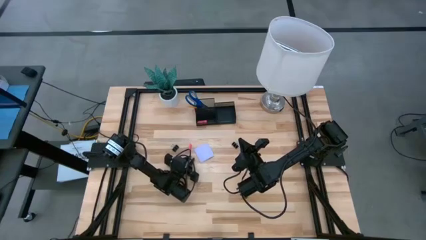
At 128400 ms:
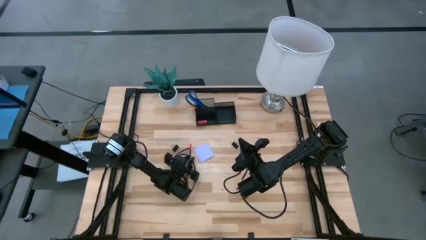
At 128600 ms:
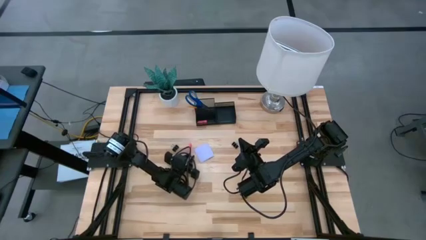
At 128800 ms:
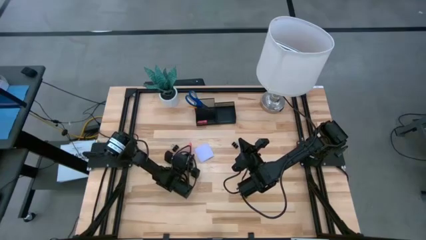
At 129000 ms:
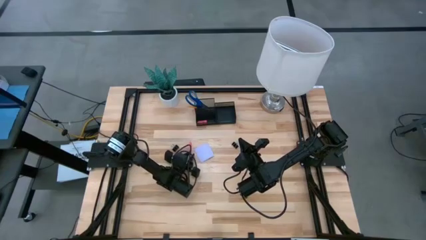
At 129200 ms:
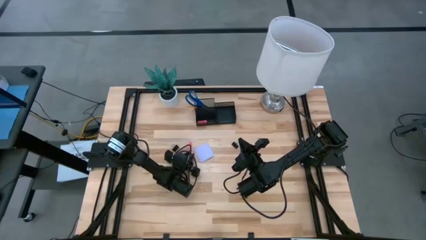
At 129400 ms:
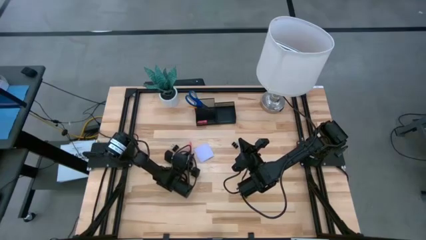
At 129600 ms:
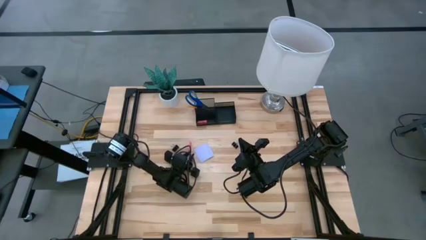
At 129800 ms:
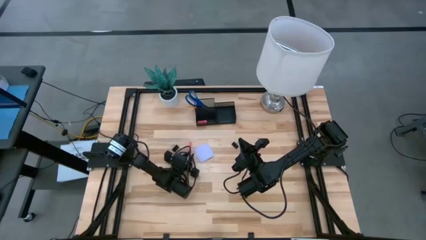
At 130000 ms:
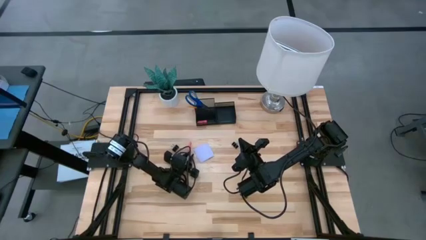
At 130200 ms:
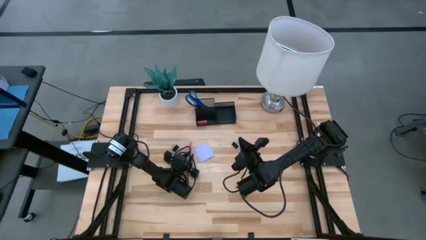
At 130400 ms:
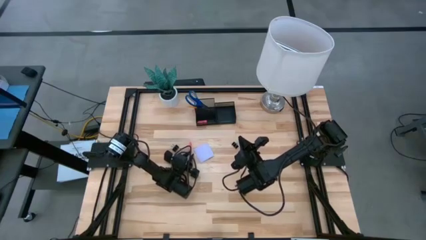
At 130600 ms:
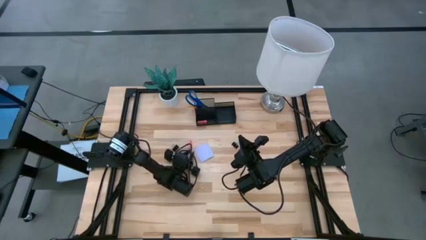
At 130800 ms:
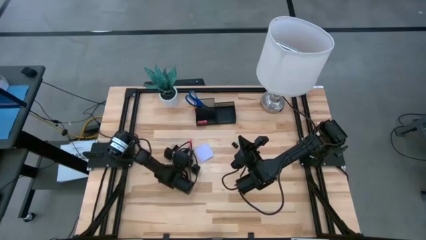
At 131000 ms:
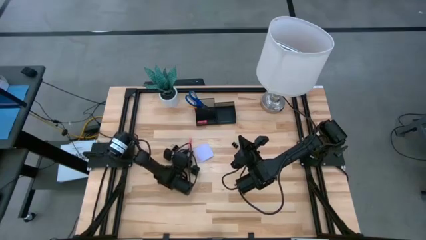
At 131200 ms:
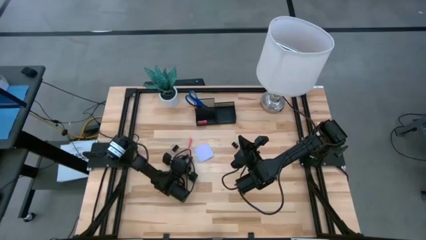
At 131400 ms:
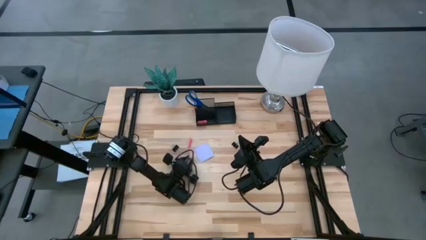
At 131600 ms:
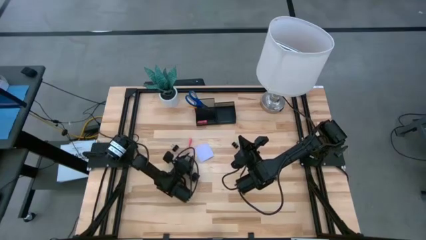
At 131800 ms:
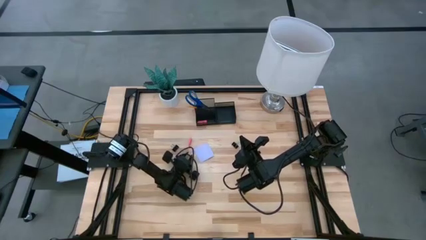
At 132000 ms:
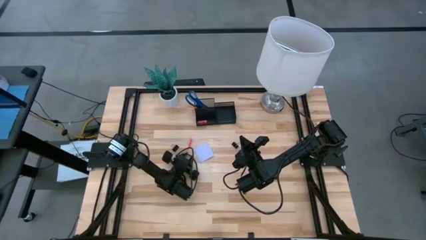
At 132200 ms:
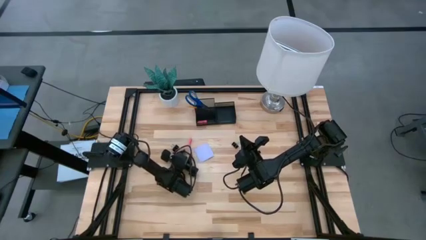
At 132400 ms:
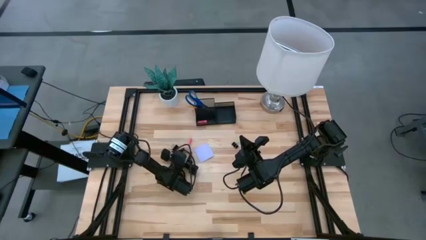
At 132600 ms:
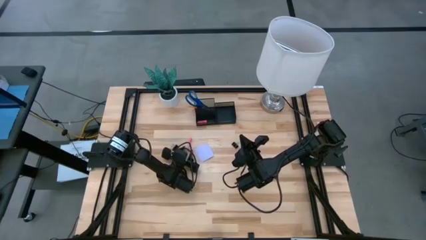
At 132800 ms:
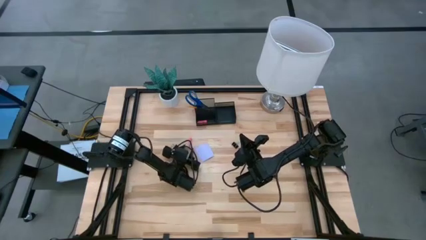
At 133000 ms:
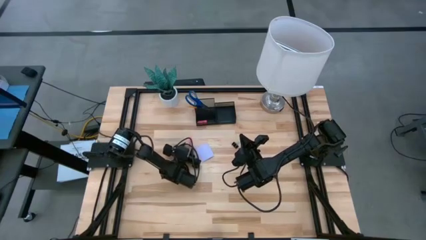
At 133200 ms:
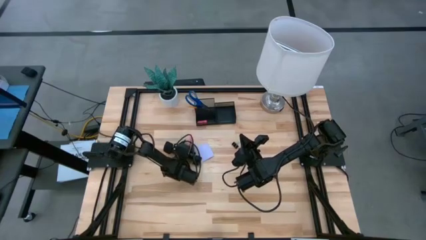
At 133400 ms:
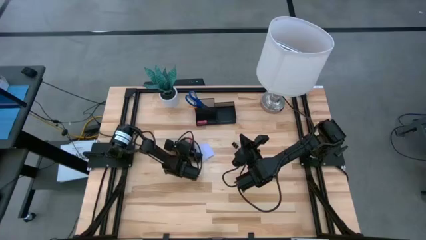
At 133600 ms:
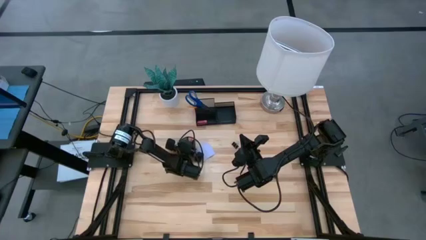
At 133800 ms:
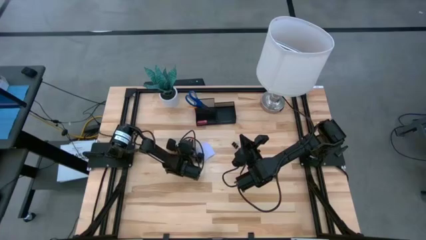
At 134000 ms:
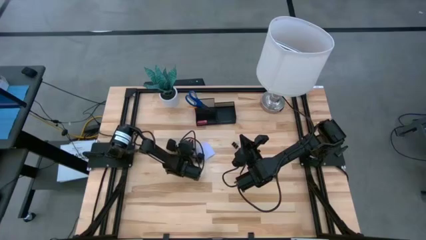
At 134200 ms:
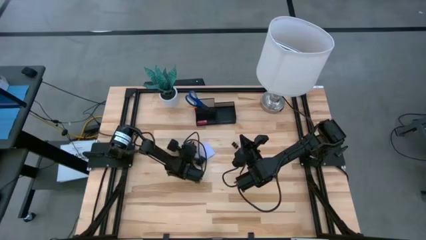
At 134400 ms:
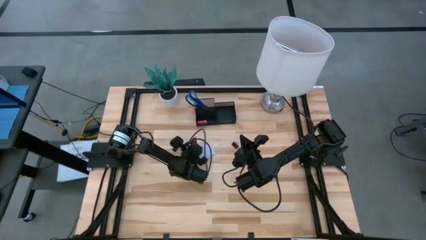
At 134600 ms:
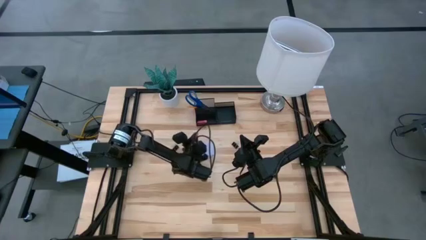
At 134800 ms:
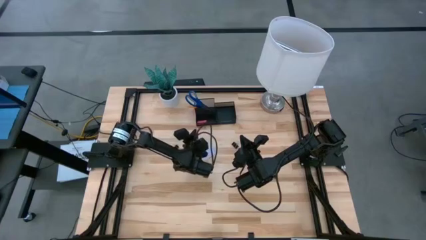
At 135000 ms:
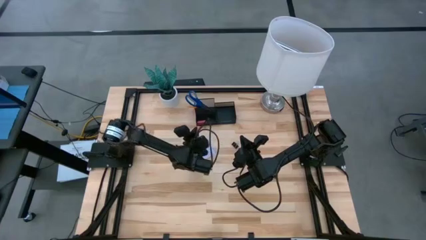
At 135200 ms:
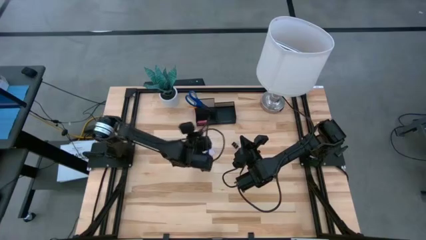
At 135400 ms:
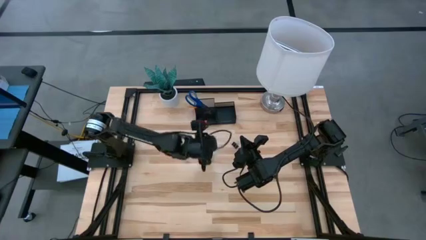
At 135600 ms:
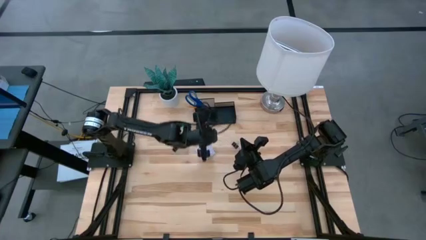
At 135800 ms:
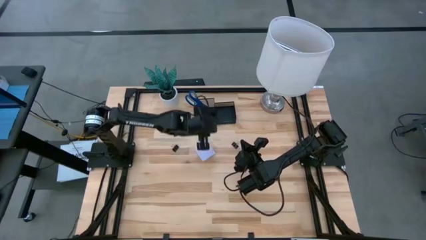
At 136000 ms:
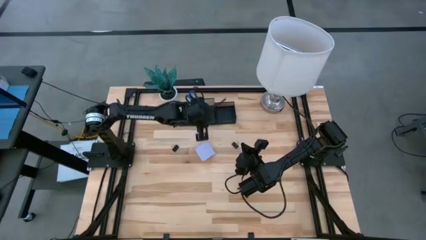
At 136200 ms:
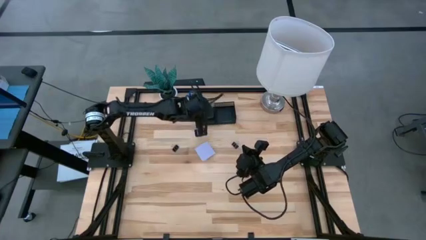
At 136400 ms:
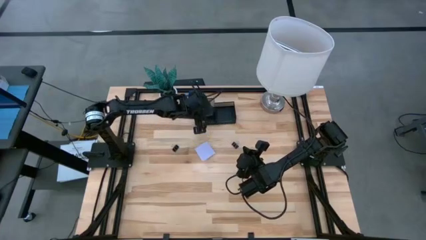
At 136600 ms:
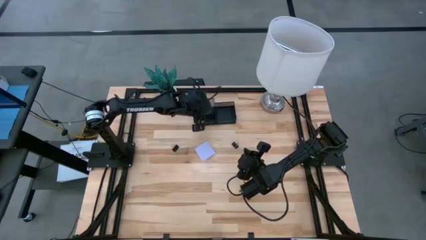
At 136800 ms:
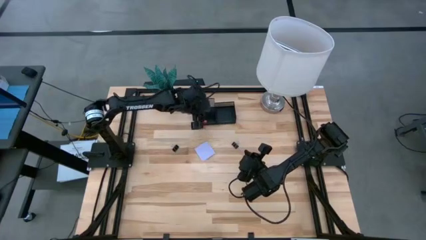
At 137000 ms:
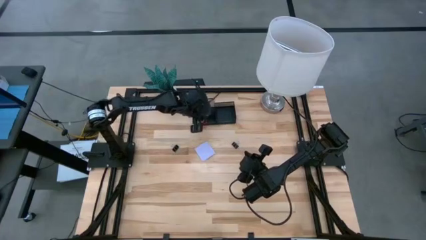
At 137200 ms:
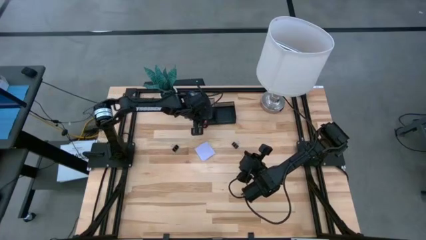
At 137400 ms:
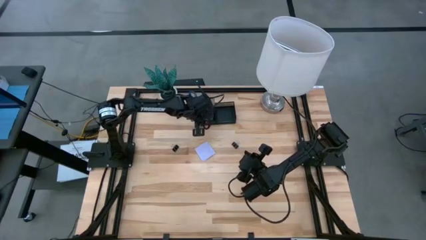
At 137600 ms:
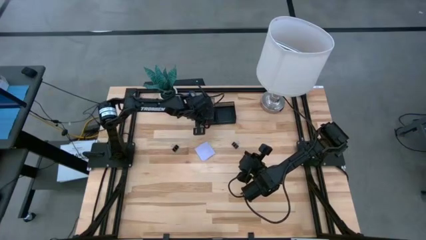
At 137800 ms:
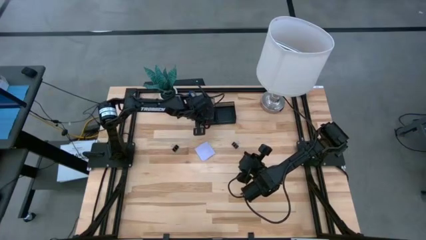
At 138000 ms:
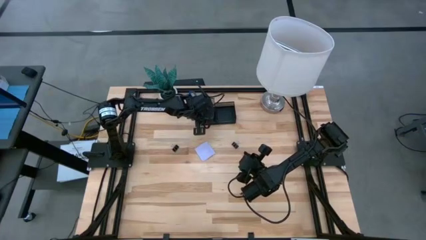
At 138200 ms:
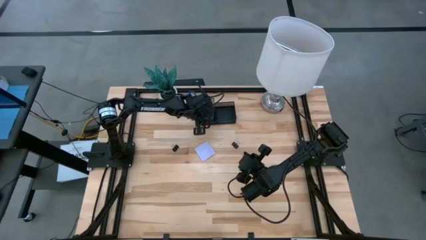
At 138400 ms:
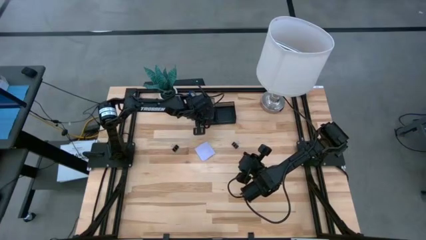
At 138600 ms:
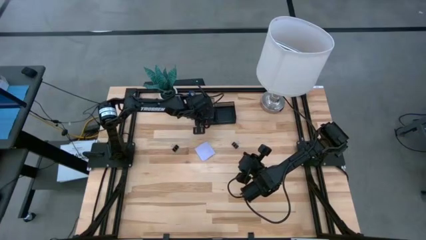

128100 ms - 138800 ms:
Task: Pick and place office supplies into organizer
Put the eraser into the desk organizer

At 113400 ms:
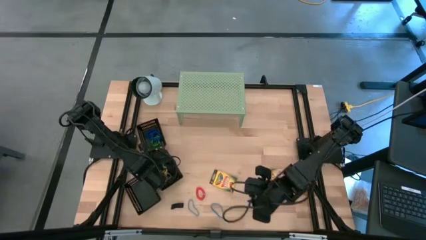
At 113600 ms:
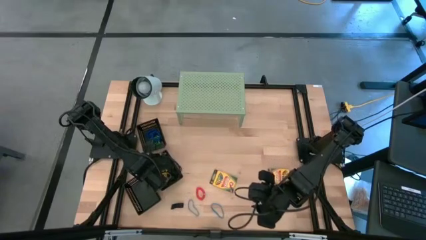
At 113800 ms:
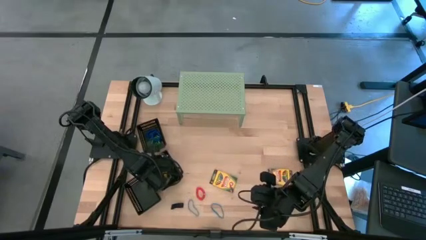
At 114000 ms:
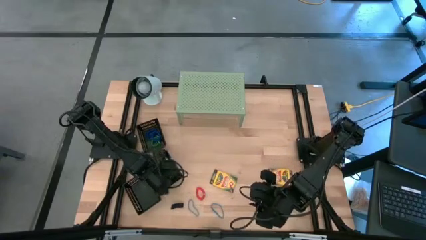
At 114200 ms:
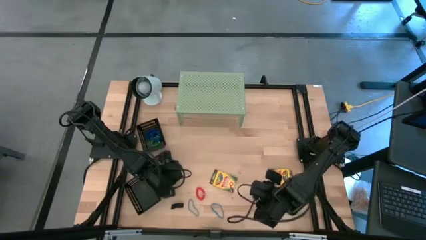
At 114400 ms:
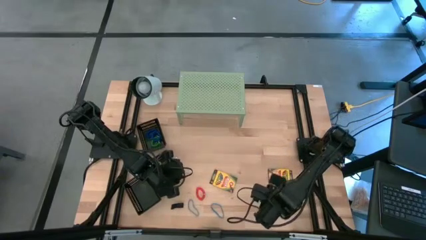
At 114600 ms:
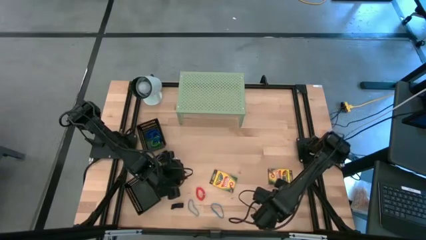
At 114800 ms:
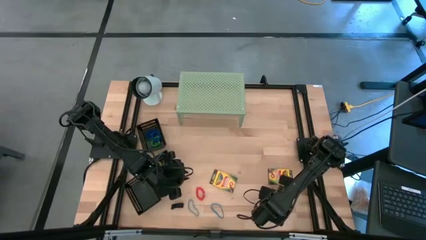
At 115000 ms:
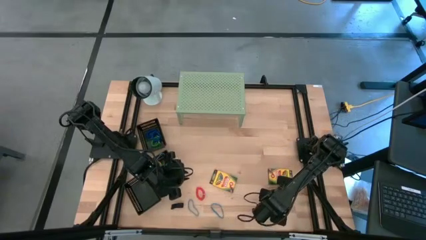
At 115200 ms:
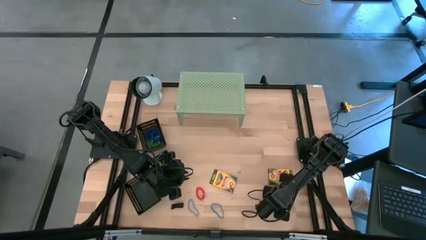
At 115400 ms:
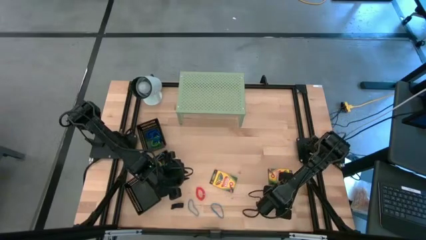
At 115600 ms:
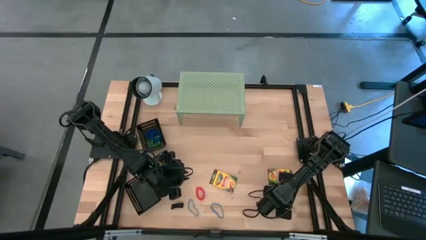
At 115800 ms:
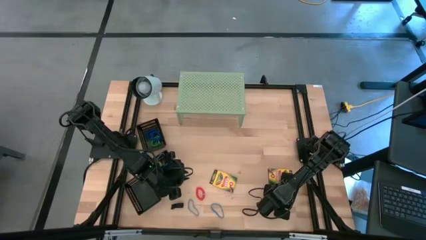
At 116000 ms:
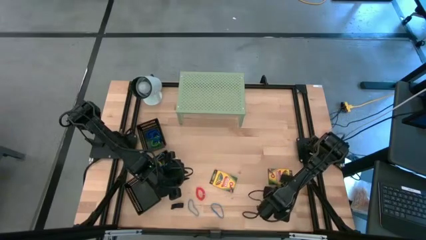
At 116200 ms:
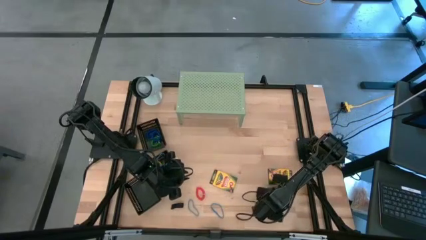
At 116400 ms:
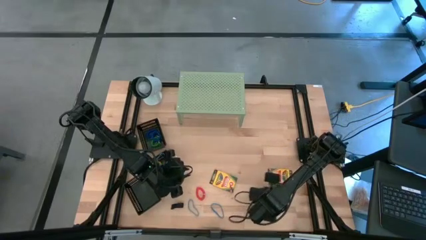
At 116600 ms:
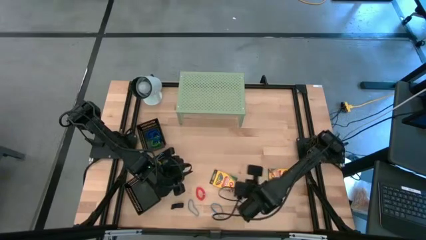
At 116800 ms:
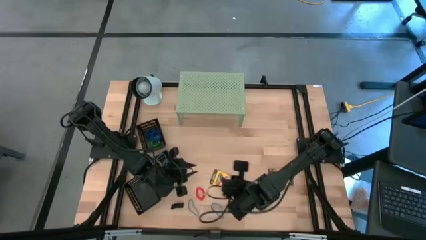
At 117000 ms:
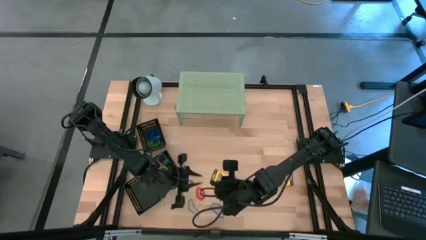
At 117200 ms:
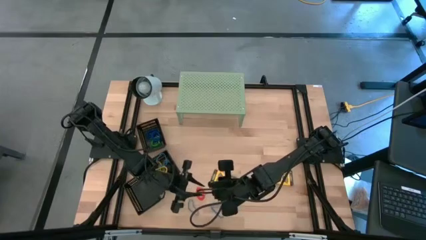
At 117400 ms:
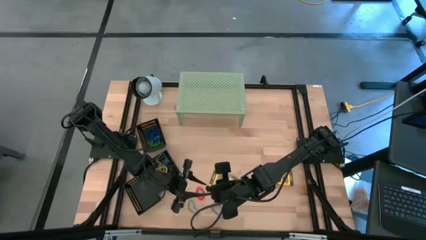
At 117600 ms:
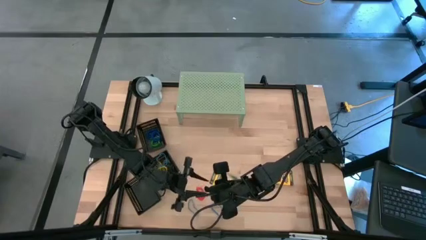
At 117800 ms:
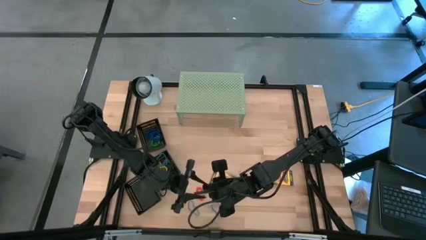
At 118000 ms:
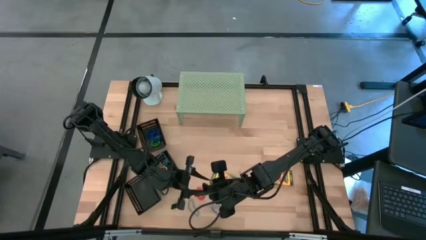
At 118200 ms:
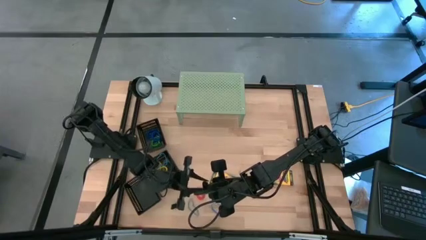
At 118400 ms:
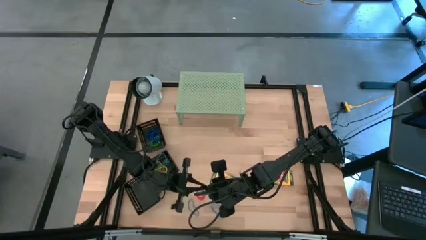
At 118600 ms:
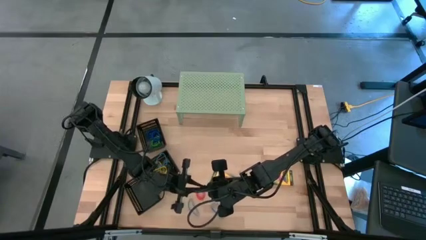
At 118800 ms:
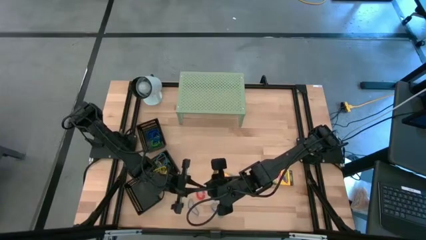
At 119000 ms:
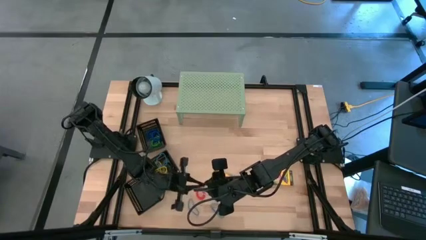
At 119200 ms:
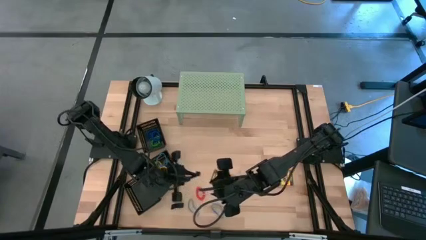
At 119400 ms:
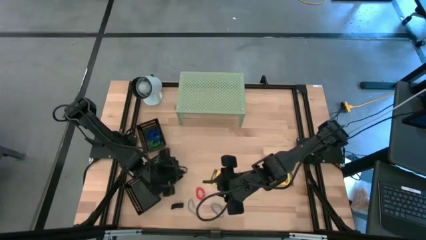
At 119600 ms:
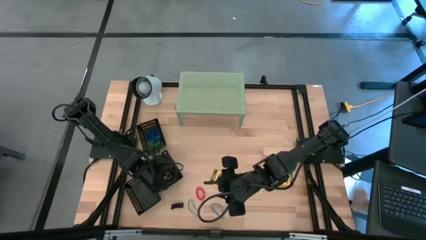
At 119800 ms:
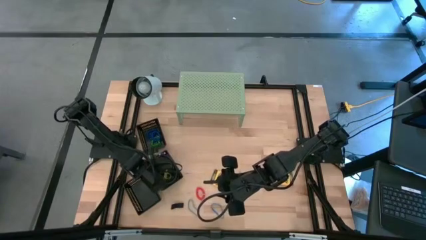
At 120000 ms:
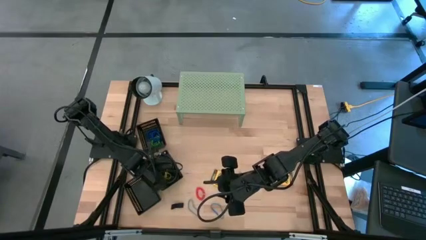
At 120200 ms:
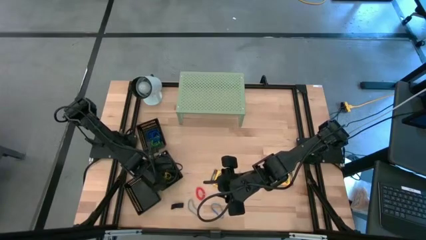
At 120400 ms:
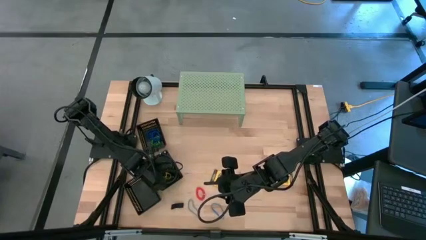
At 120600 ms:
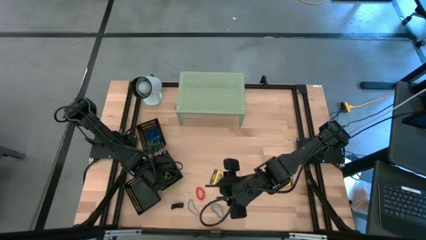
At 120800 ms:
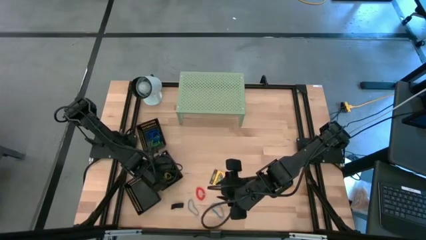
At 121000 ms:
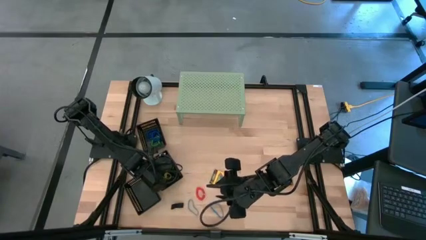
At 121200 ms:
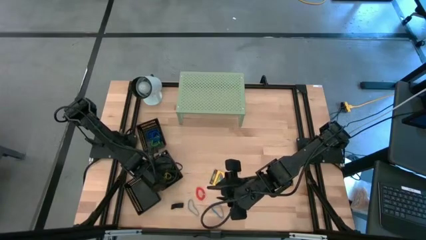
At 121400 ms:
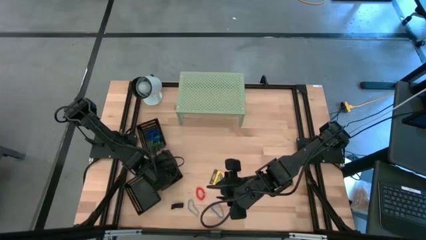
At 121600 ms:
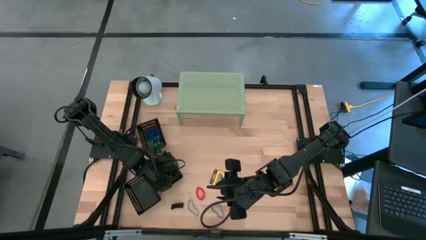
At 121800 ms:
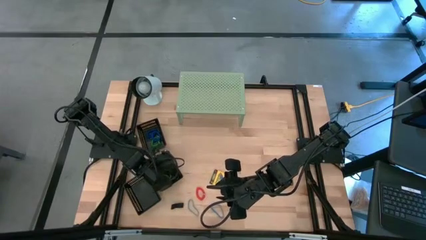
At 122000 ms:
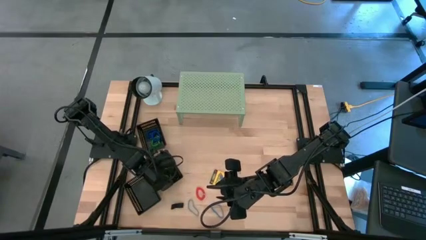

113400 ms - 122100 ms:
Task: Pick & Place Office Desk Supplies
Put the black rubber band into the middle black bin
